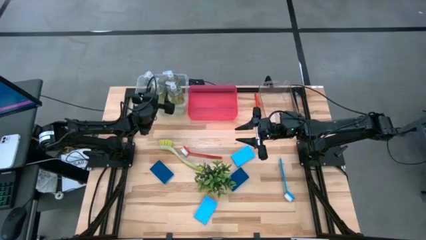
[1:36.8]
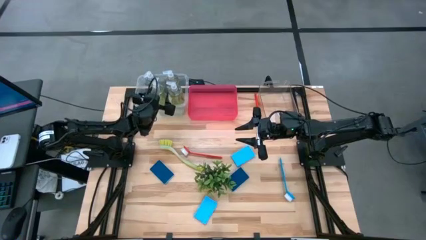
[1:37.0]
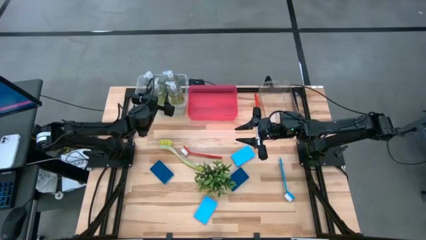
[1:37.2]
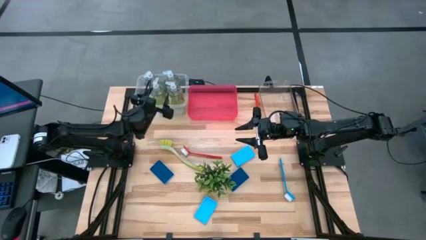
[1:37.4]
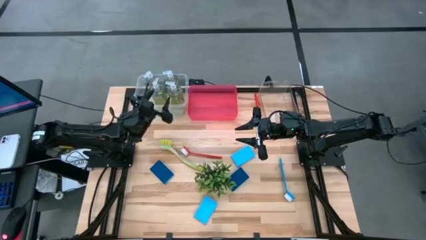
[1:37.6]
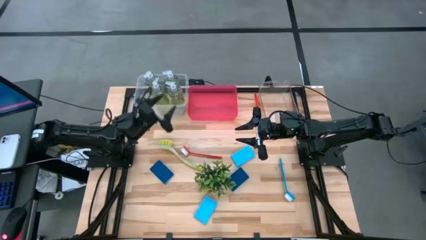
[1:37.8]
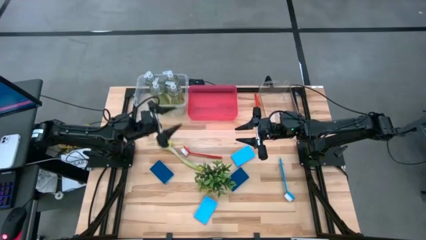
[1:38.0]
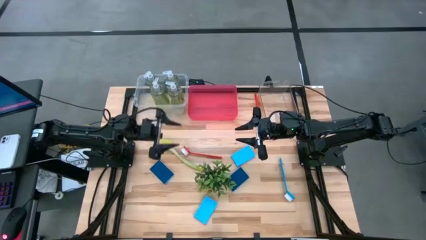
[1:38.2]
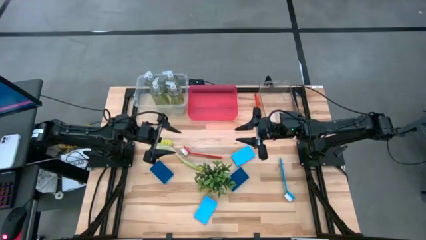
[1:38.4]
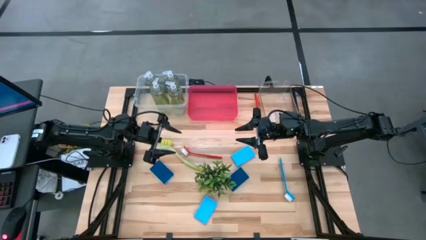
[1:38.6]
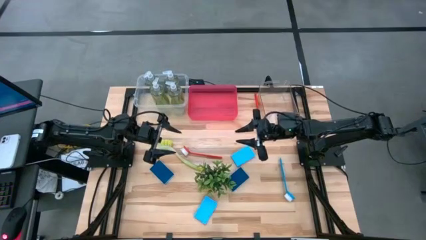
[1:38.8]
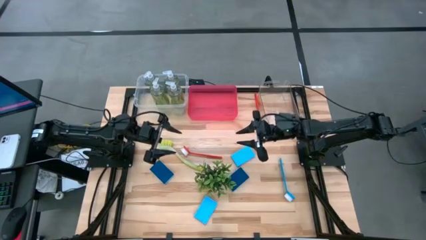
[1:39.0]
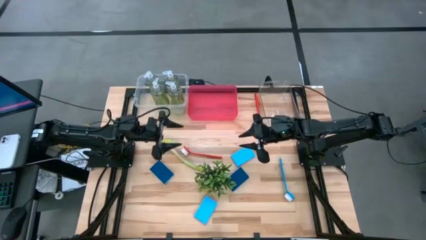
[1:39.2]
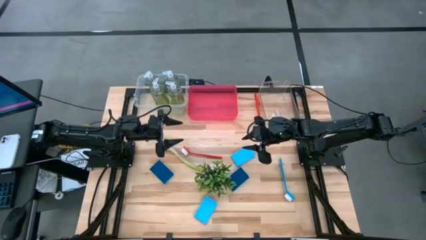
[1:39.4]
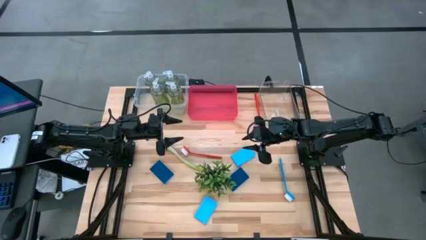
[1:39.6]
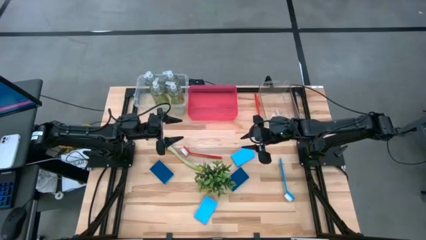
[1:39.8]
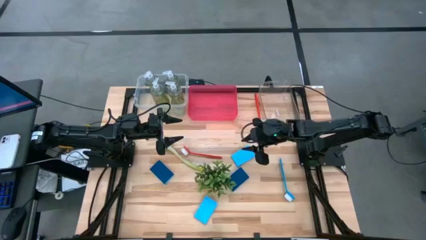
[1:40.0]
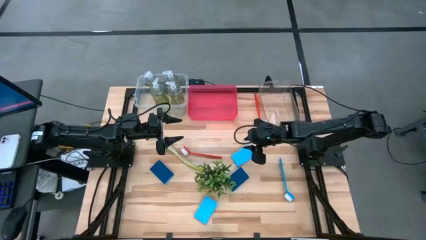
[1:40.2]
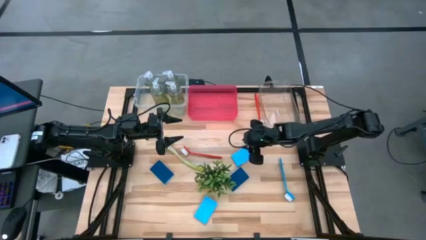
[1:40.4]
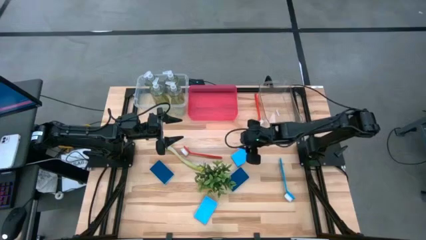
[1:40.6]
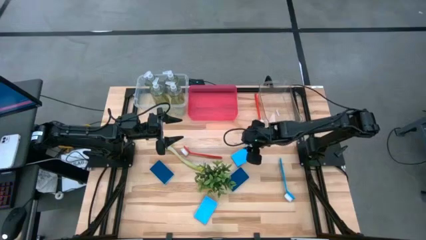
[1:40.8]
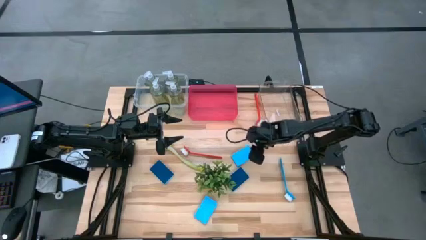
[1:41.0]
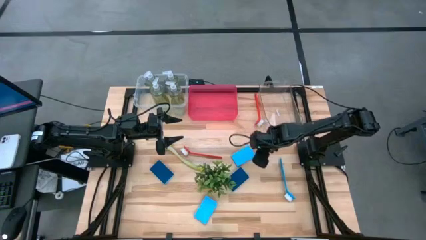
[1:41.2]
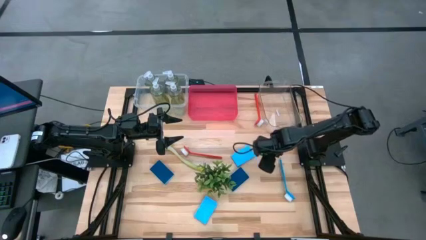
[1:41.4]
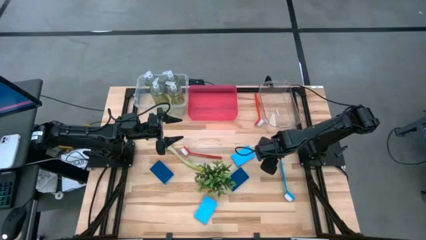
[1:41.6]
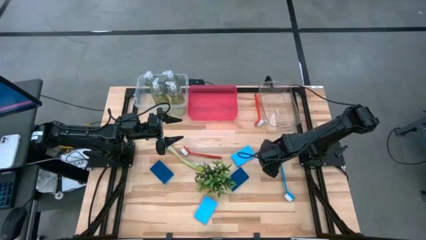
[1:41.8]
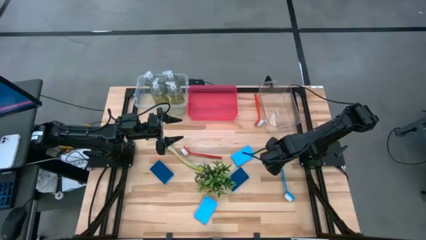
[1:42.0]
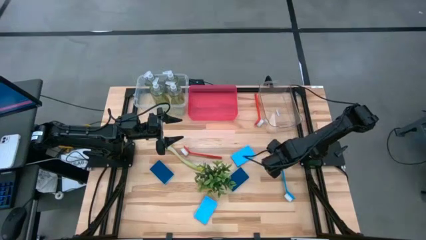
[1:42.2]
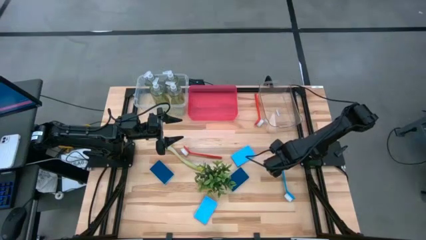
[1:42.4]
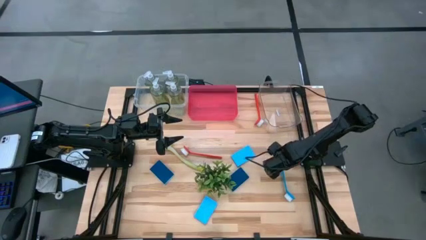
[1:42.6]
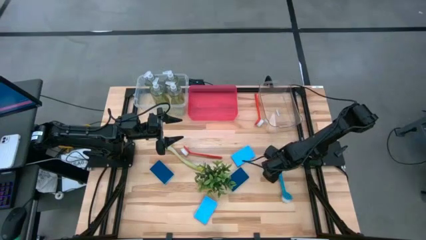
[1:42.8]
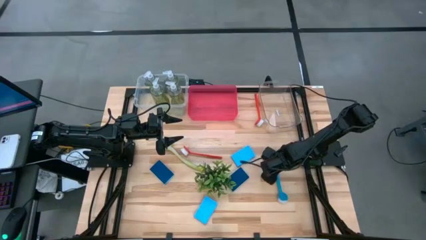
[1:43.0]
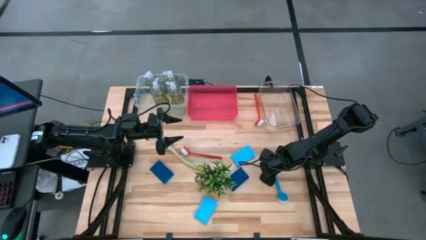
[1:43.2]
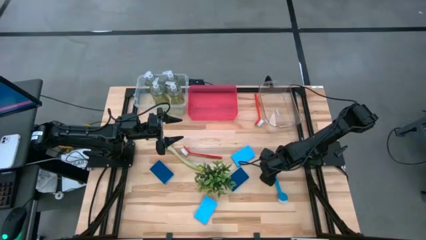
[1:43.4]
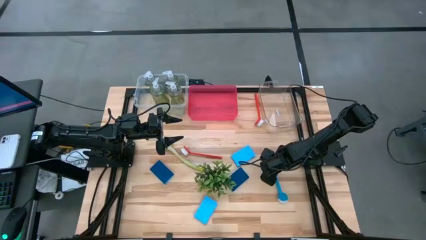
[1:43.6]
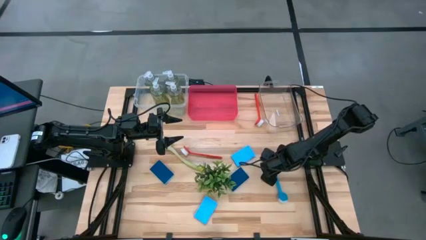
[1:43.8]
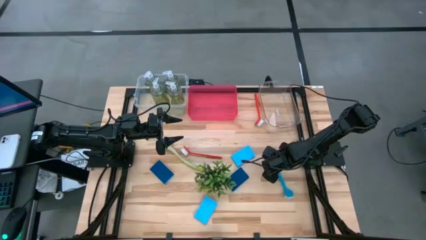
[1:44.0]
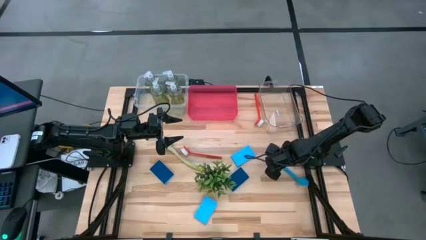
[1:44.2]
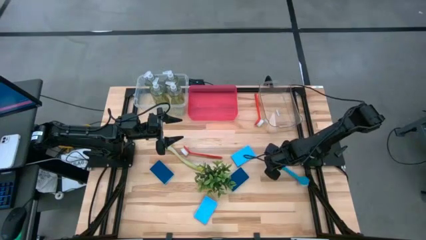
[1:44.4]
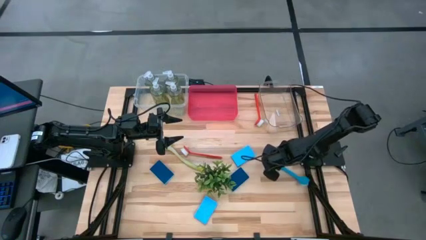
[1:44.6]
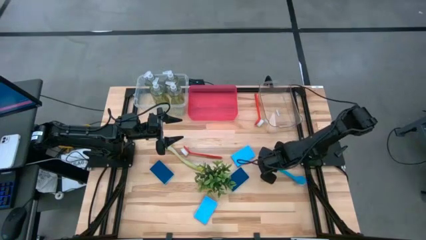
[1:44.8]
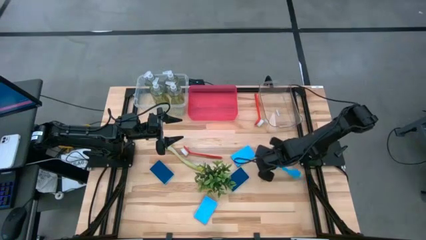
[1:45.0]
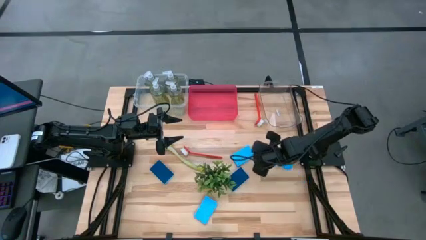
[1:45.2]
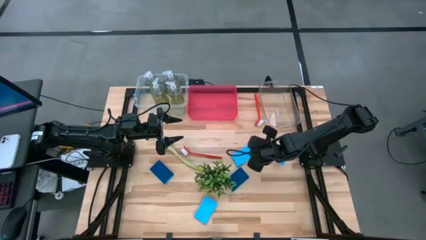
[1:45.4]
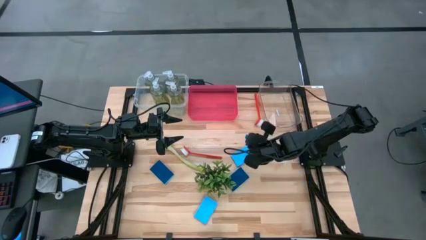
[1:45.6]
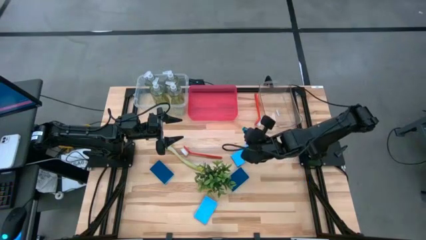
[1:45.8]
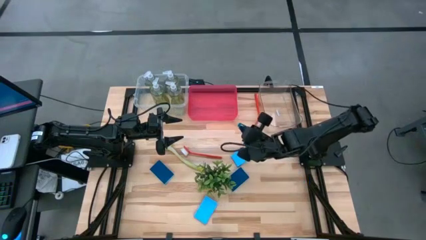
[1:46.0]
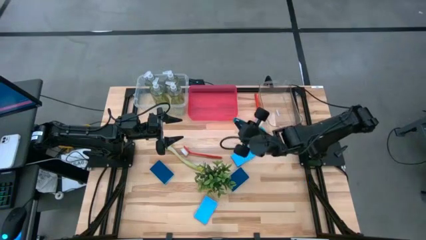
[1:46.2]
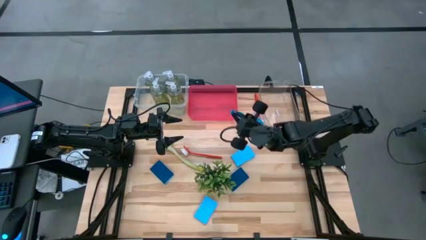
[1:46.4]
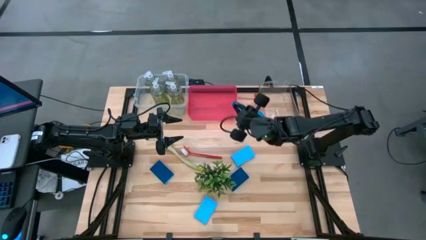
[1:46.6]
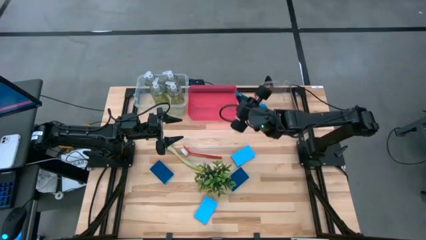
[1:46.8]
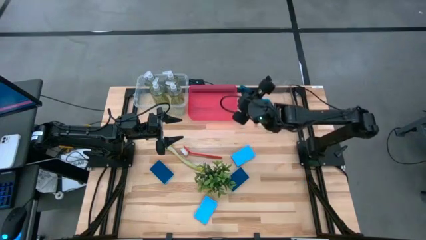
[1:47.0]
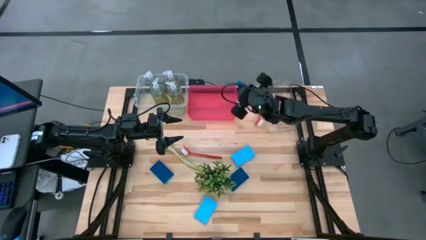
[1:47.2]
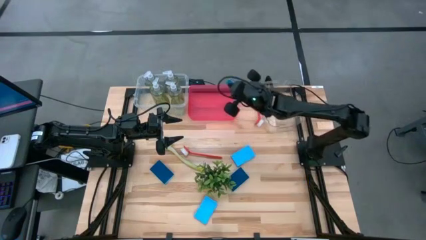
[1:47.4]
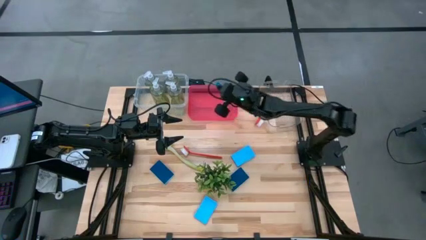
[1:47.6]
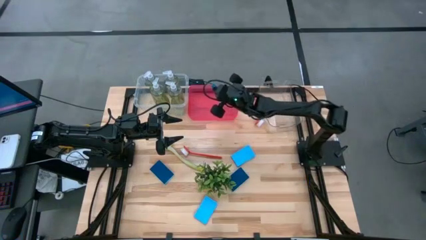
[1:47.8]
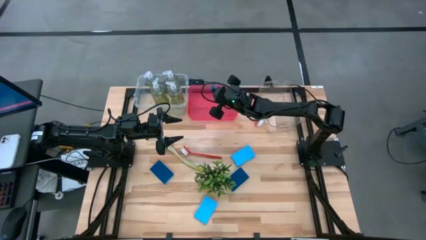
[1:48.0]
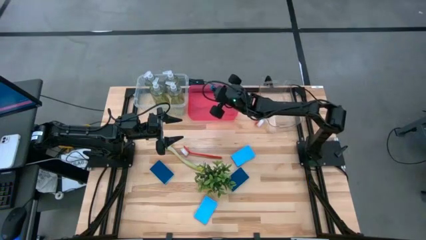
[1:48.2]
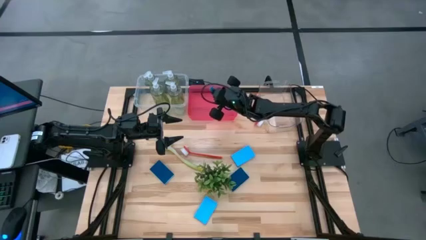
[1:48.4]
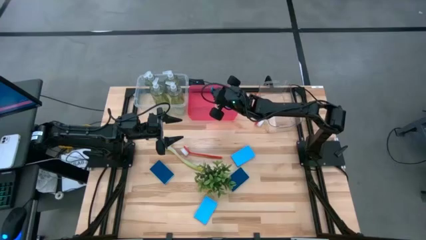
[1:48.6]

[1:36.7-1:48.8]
Task: Pick & Place Kitchen Sink Supplies
Put the blue dish brush into the red bin

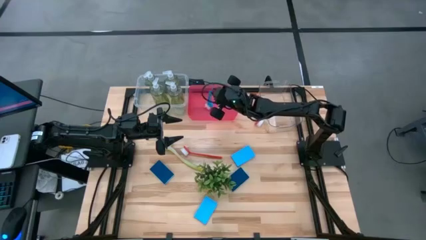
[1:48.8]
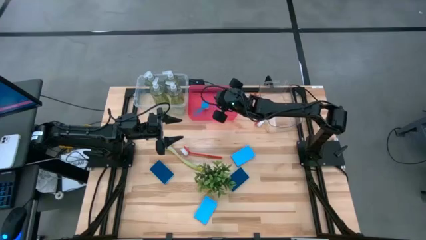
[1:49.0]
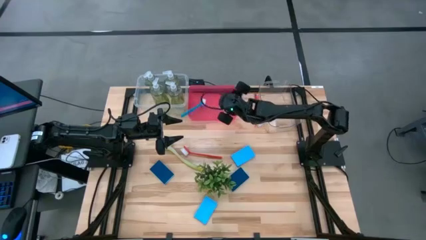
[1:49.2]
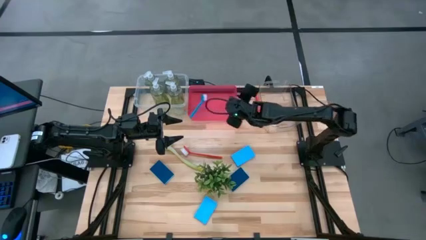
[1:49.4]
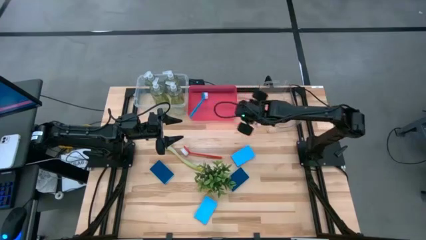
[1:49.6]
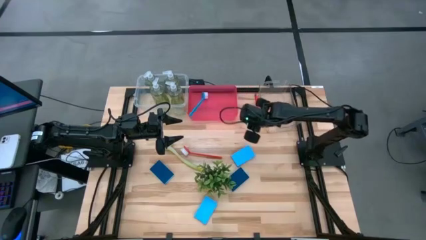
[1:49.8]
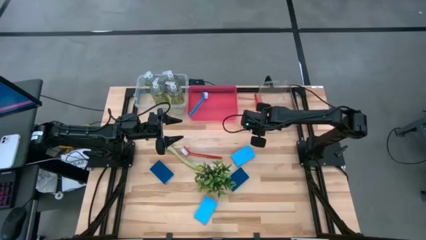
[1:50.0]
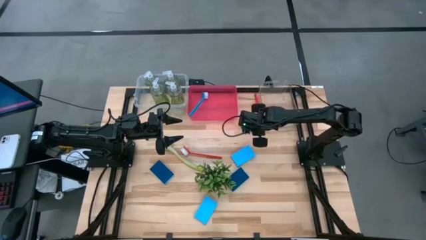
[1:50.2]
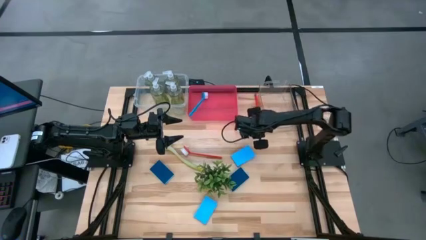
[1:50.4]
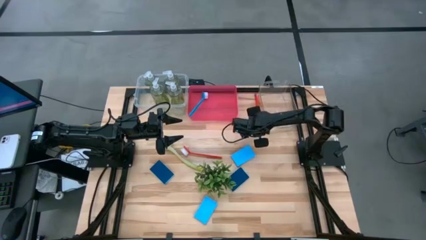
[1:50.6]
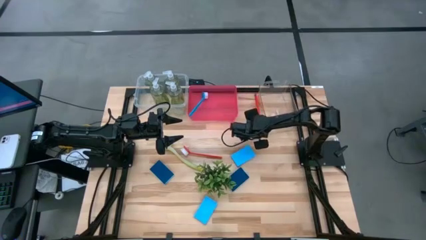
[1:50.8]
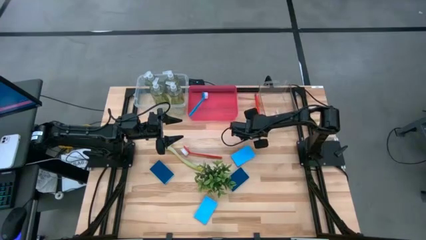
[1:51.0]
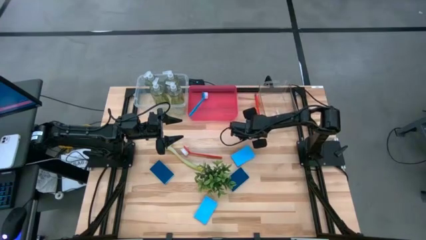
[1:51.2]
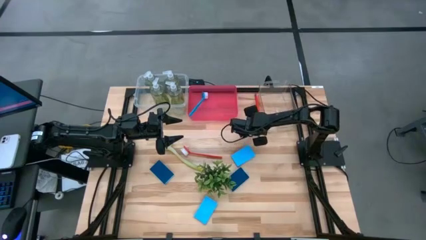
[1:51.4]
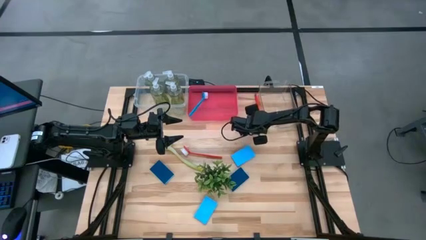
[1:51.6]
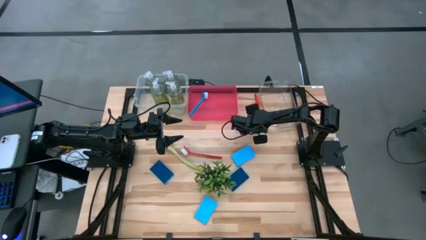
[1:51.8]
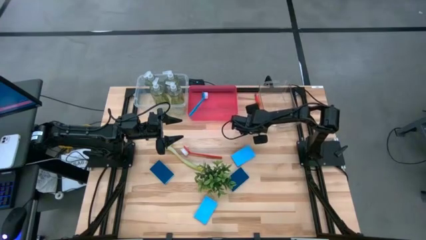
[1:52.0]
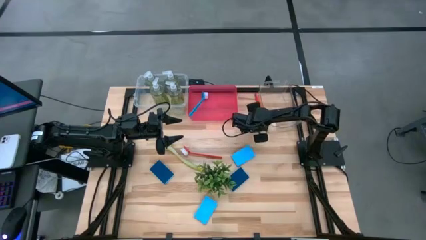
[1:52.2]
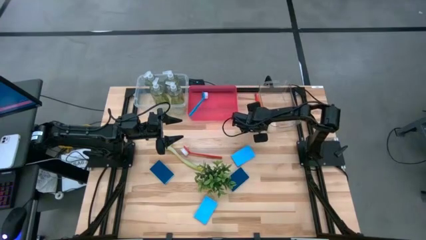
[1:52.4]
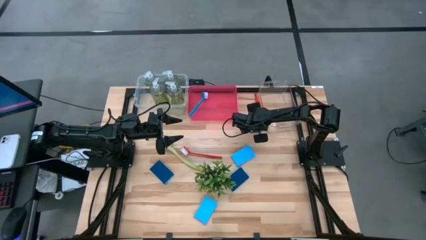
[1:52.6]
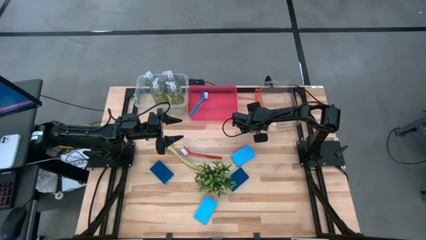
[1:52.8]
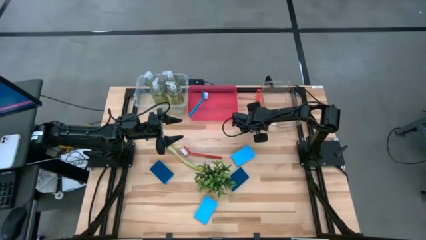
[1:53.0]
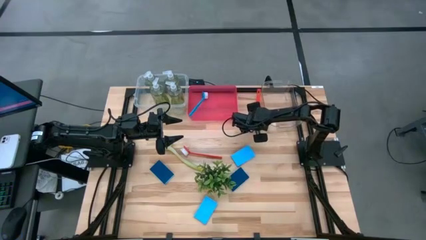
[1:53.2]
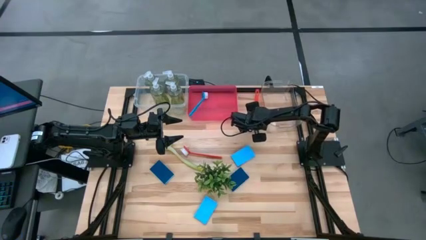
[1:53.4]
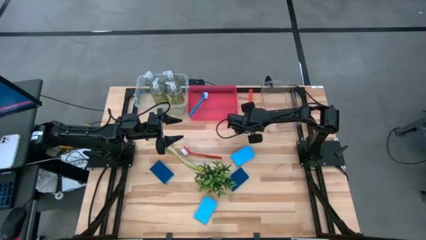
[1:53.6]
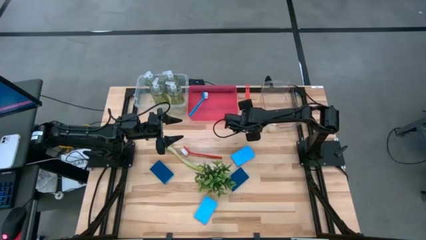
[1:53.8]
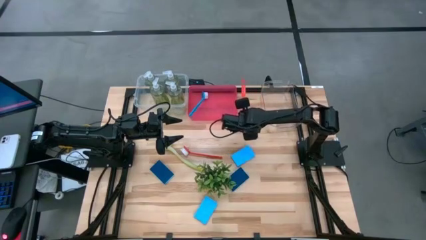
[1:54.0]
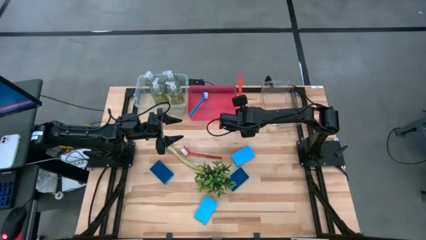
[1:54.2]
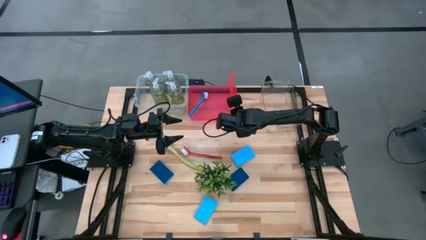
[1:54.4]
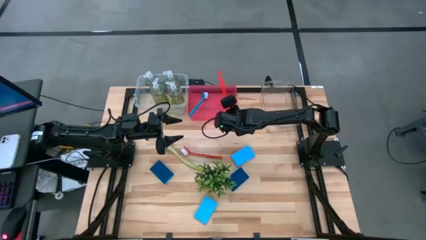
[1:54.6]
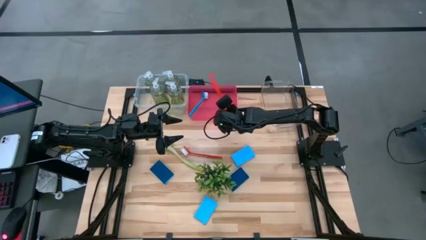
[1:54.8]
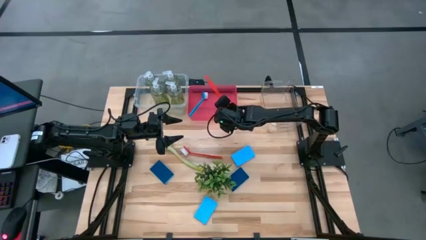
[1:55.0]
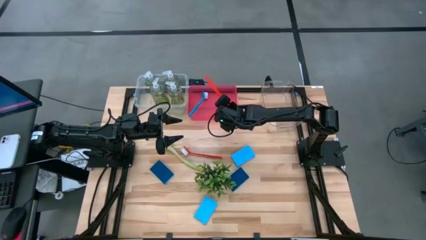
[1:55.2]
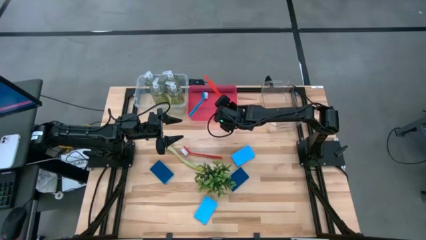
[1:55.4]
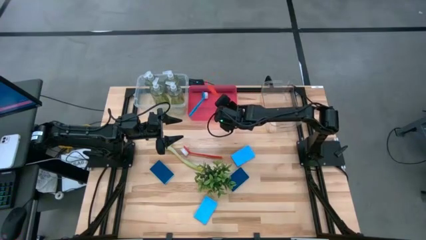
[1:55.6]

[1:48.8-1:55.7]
Put the red dish brush into the red bin
